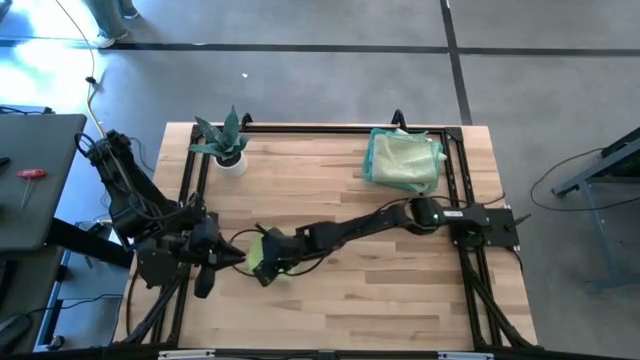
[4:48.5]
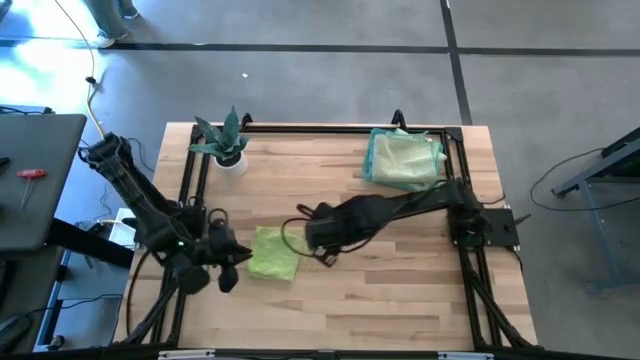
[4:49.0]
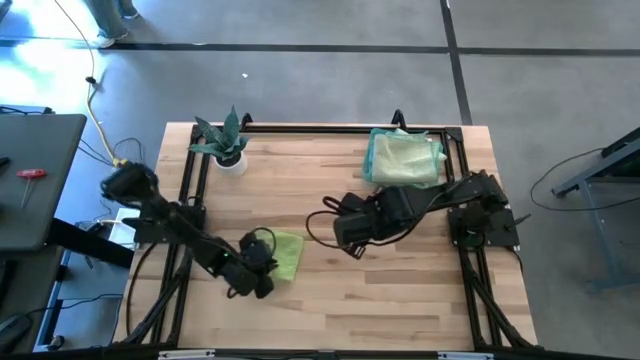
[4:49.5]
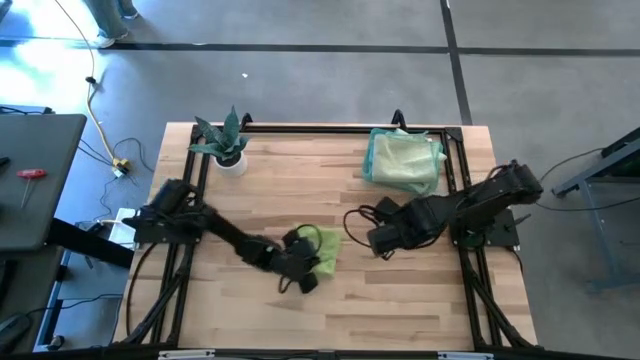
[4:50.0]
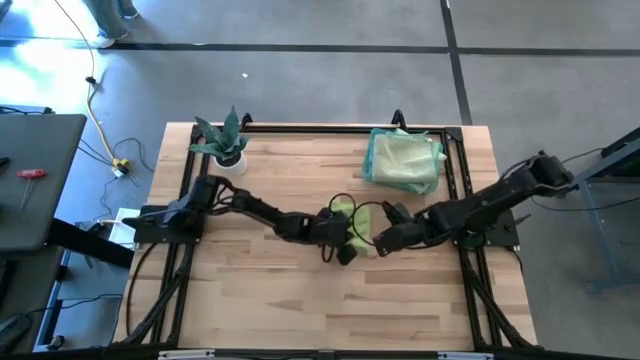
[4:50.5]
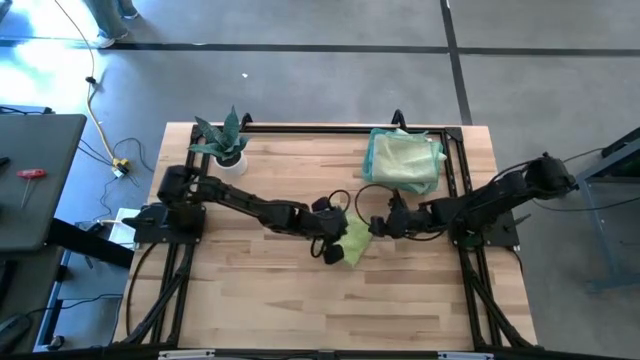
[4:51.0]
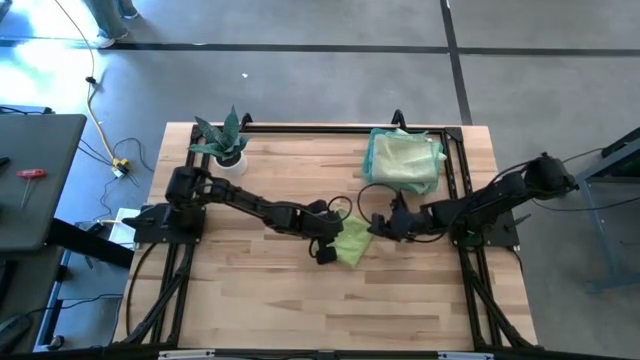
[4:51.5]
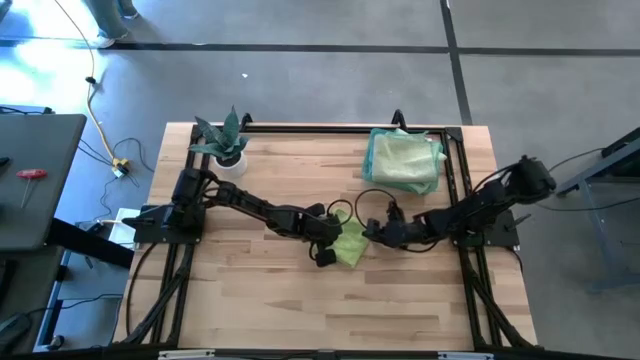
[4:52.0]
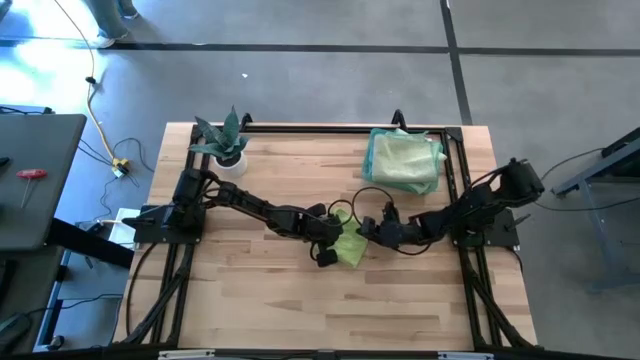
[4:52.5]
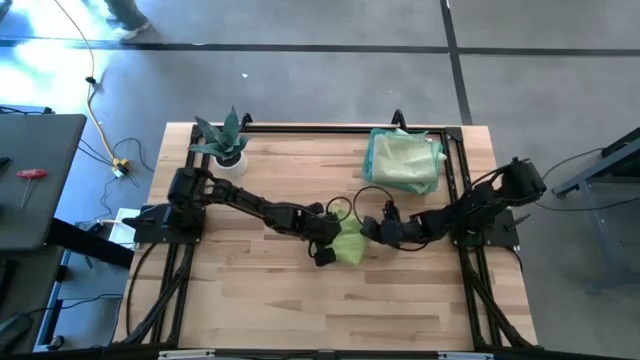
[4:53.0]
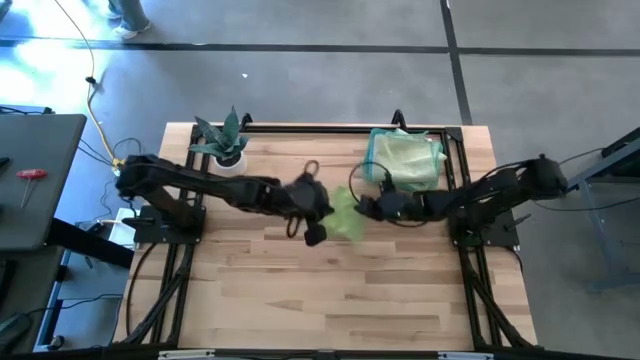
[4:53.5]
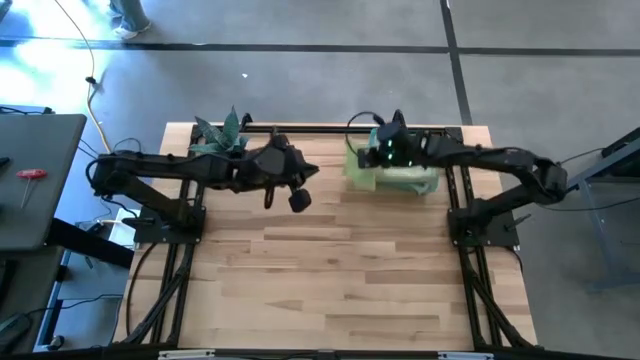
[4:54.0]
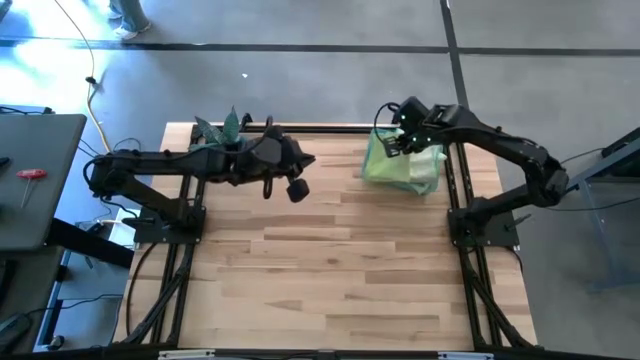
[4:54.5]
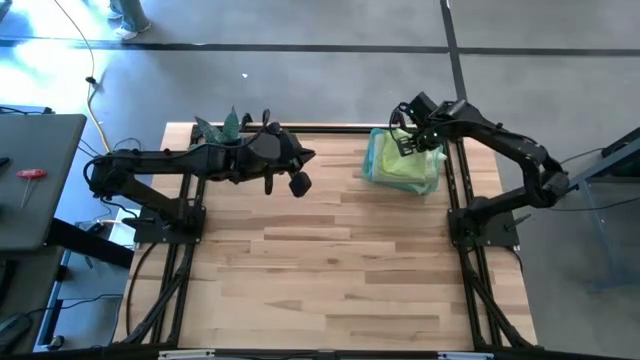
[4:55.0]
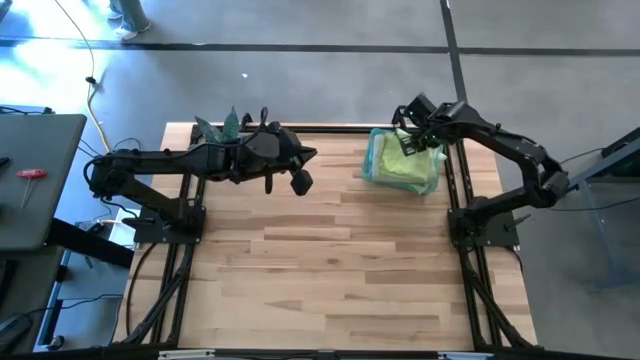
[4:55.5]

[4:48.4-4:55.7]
Task: Fold microfiber towels
Stack the folded light green microfiber cloth on top of the folded green microfiber cloth

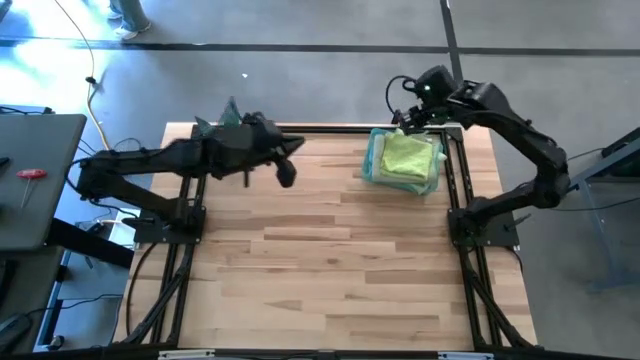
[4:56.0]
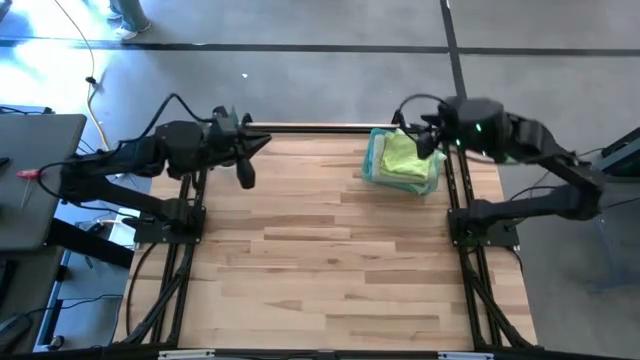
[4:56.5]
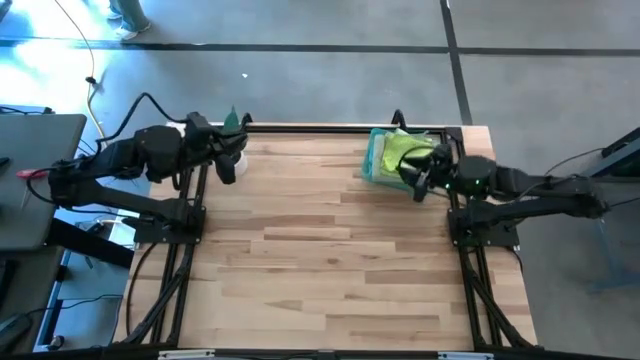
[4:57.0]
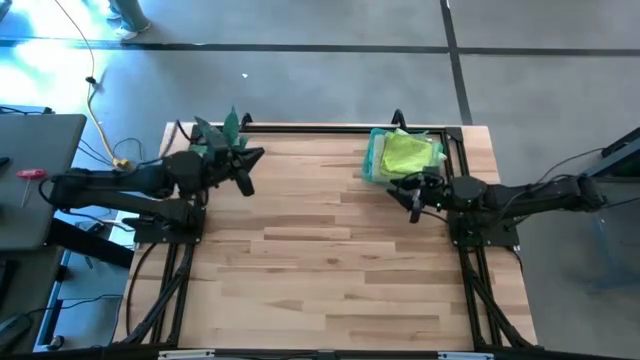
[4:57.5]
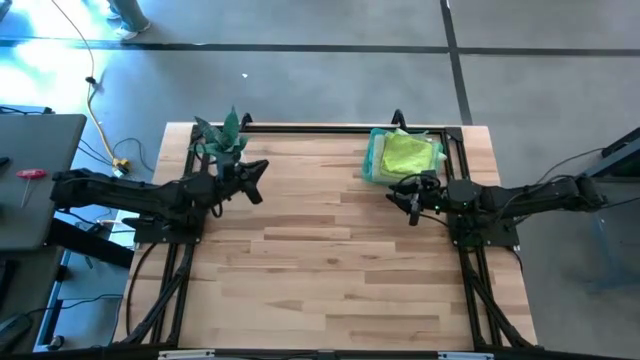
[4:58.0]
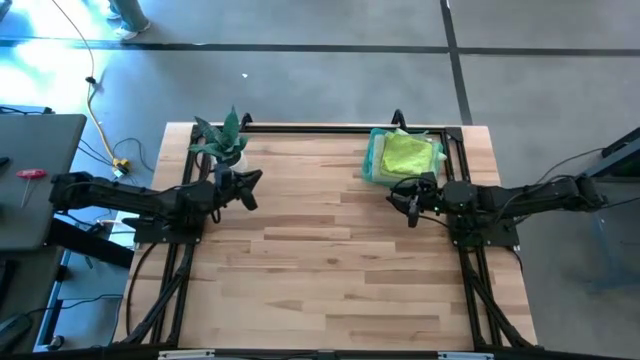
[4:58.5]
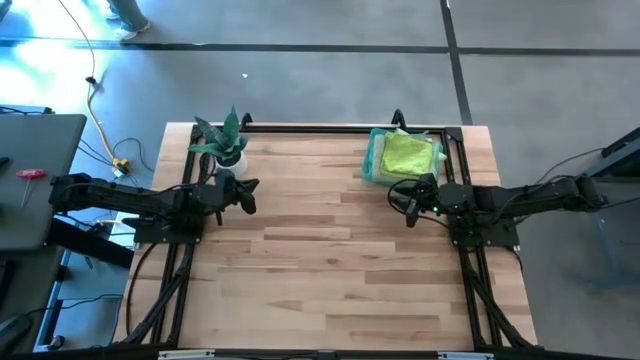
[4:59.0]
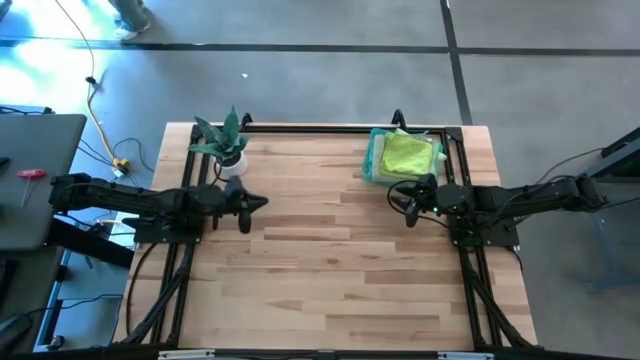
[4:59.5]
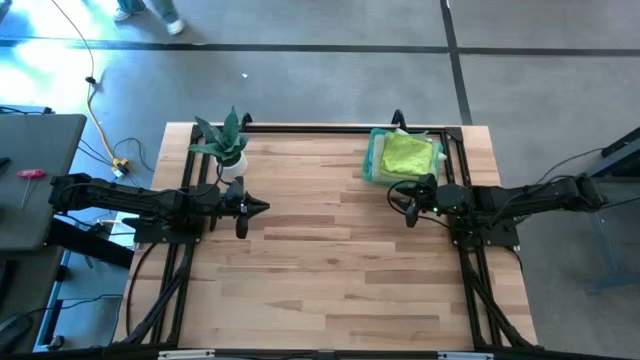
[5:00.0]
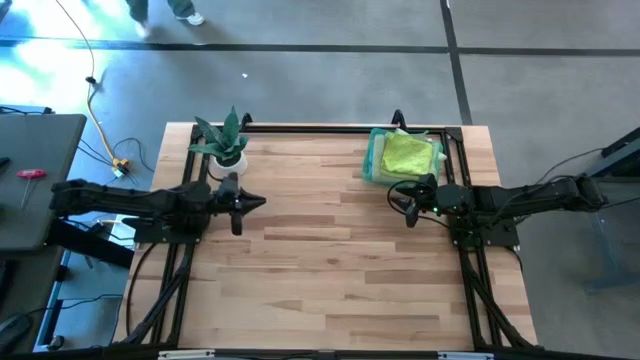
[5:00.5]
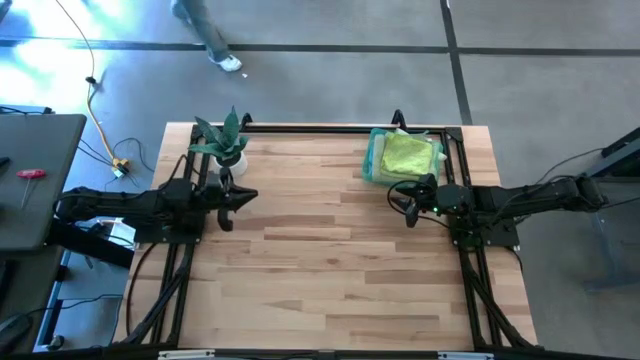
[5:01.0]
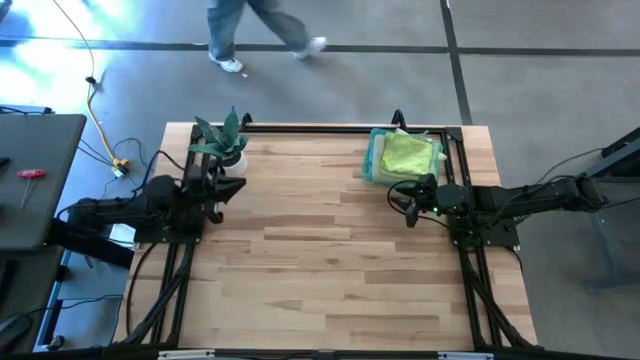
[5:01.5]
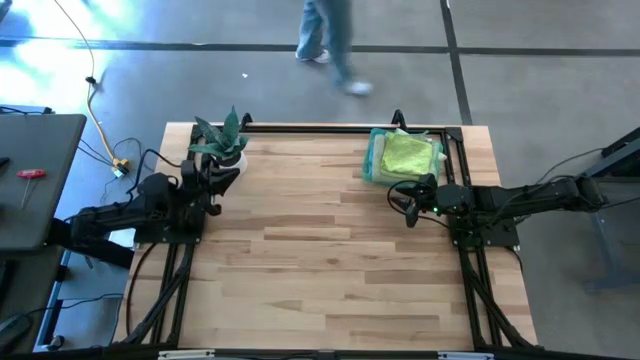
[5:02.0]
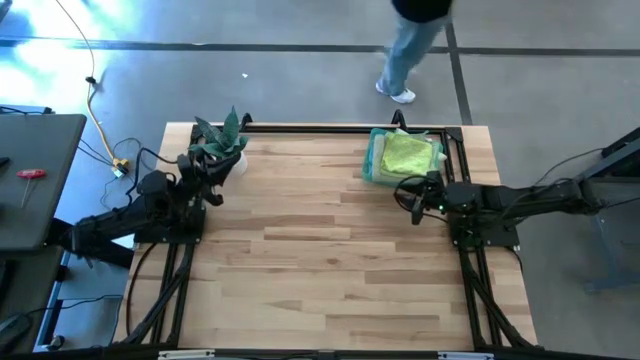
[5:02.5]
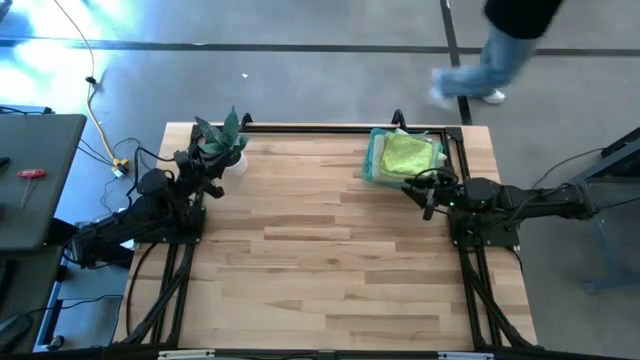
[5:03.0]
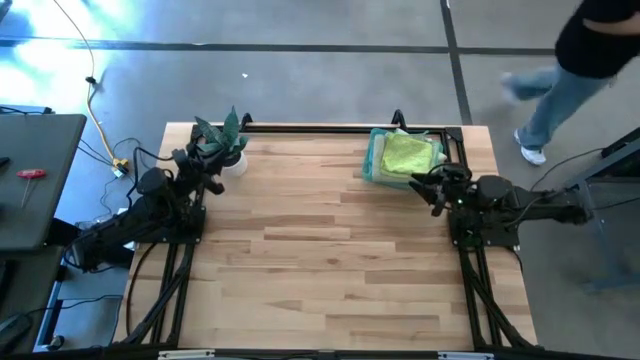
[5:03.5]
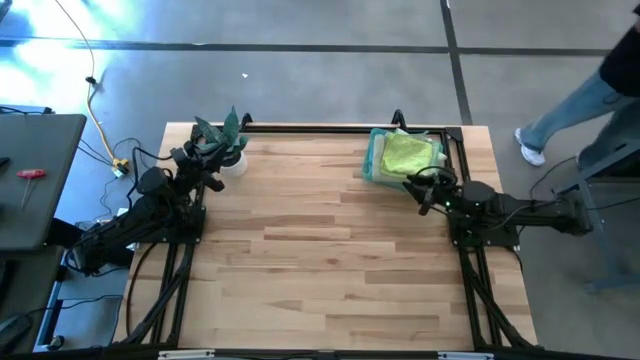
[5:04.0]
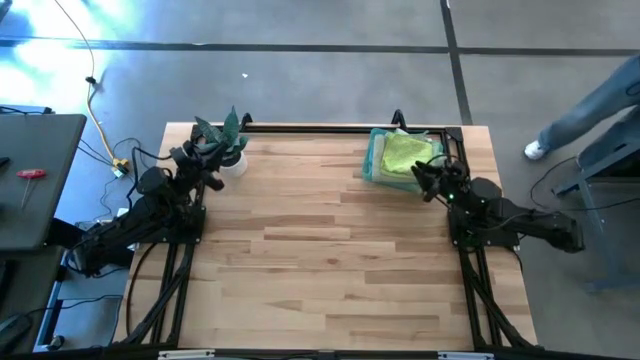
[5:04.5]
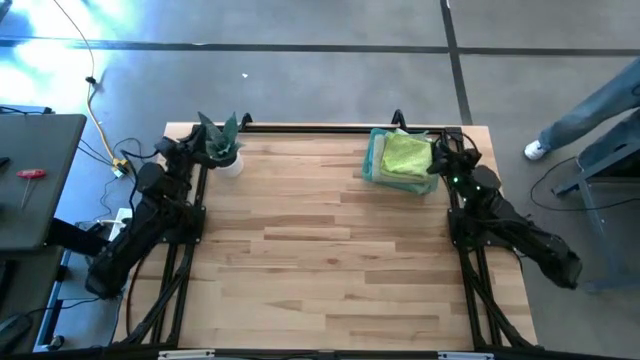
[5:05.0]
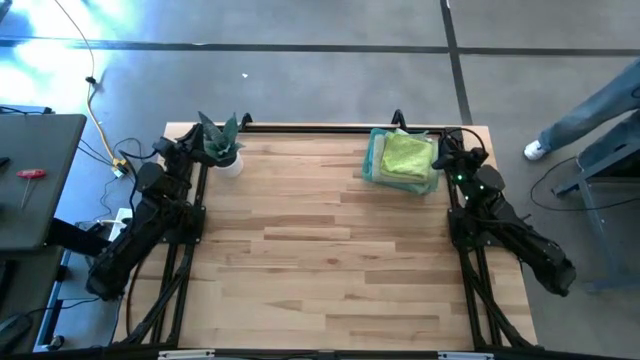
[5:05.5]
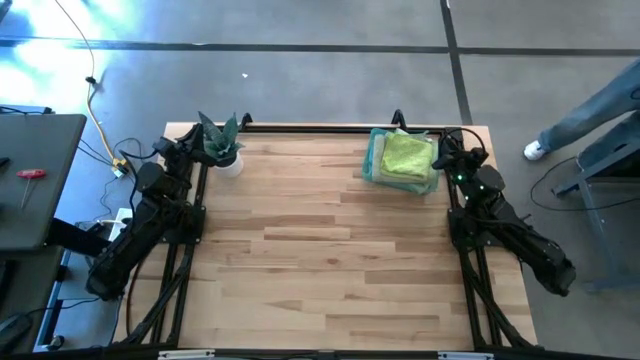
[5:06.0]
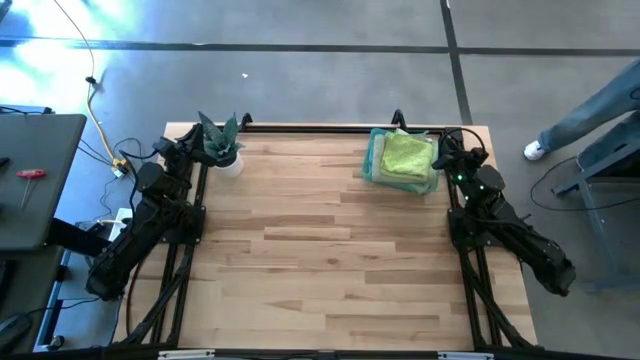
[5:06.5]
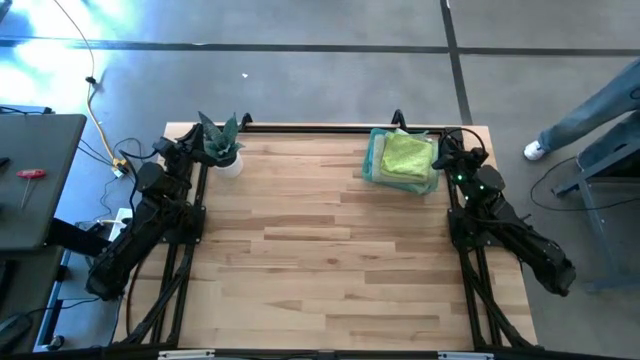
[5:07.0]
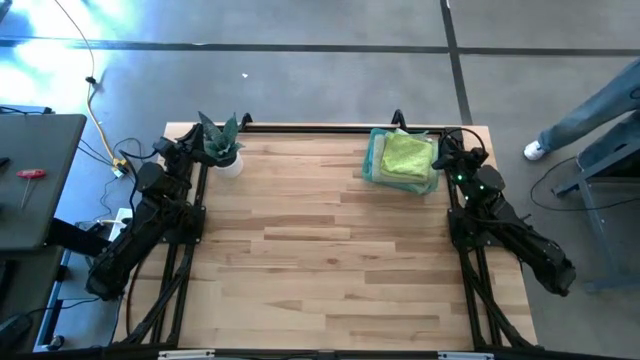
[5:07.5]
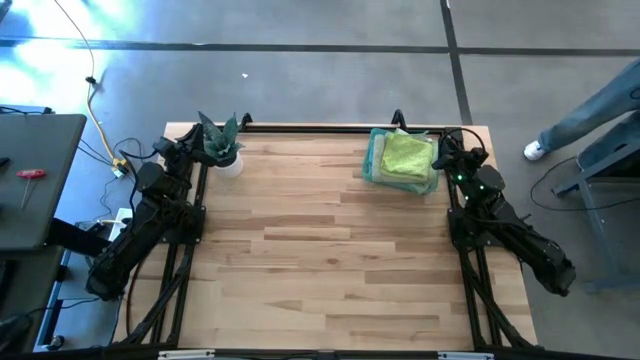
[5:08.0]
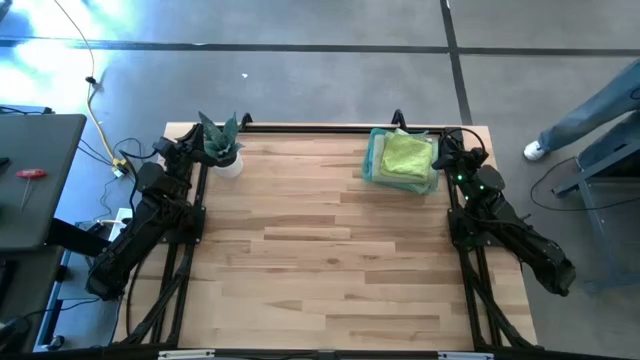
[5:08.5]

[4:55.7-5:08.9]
Return to Home Position

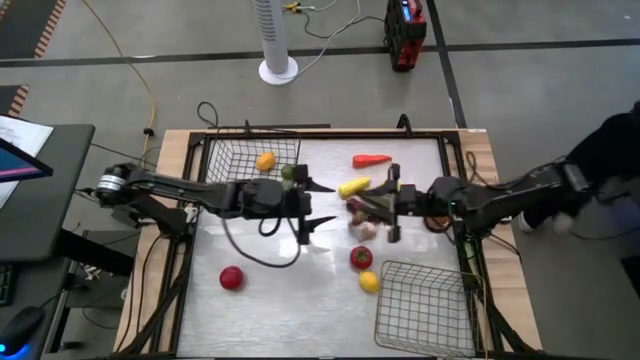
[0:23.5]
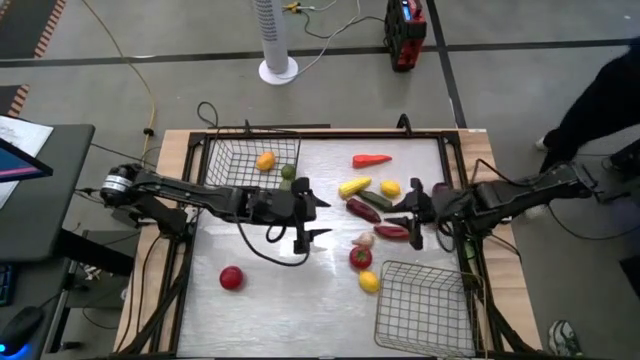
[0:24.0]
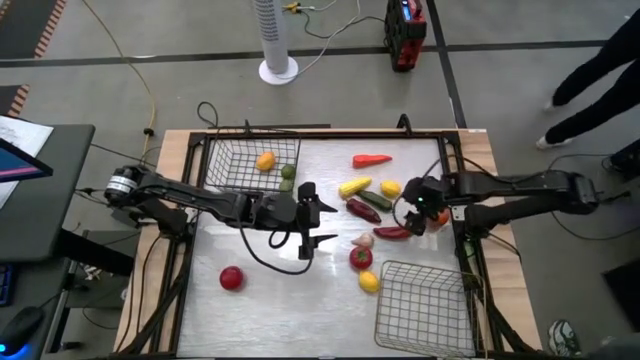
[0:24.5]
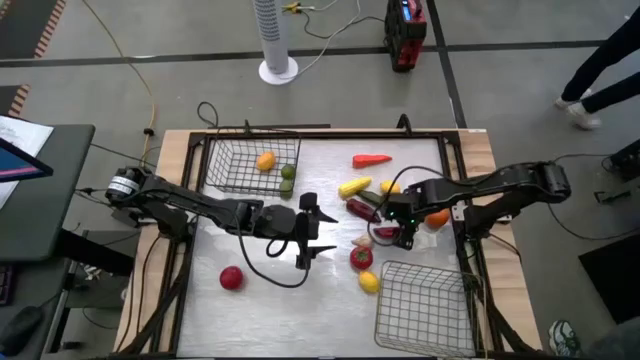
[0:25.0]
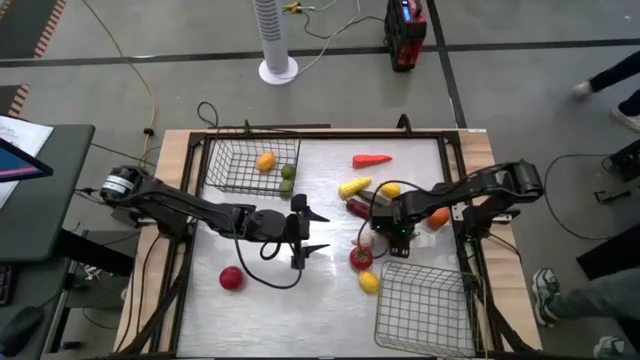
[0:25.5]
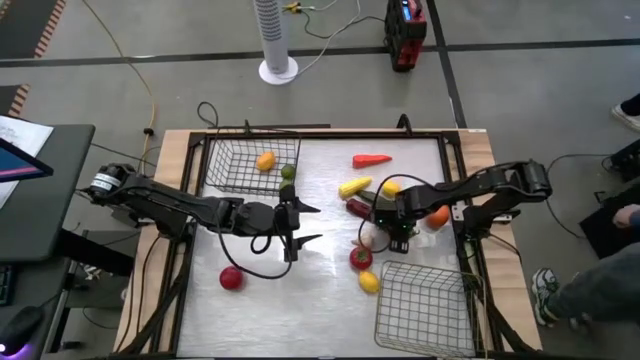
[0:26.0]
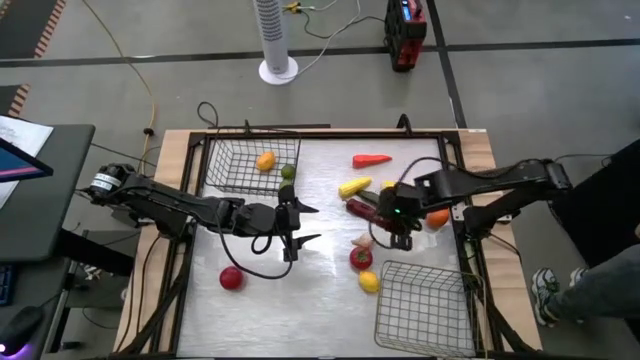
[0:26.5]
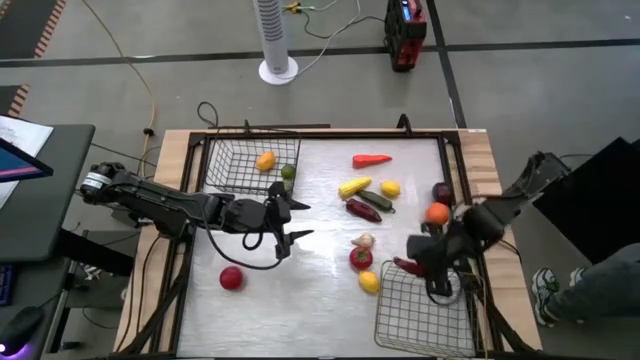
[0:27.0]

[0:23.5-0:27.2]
Task: Sort produce into baskets
Put the bottom red chili pepper into the golden wire basket
